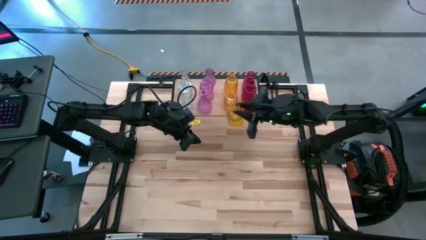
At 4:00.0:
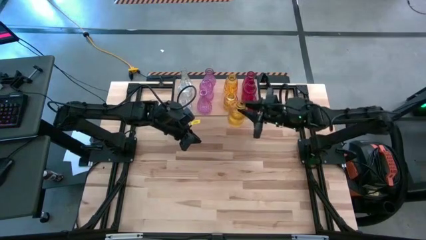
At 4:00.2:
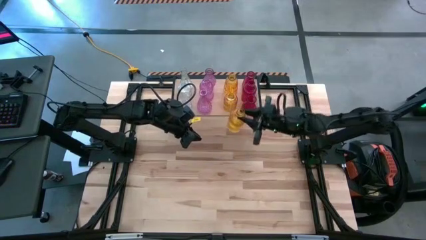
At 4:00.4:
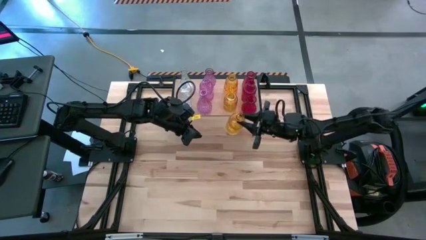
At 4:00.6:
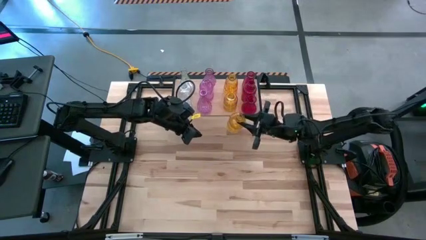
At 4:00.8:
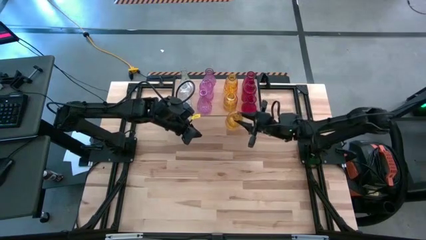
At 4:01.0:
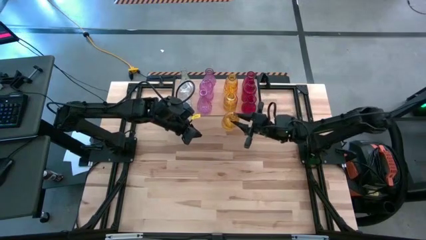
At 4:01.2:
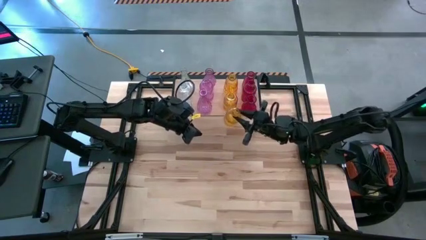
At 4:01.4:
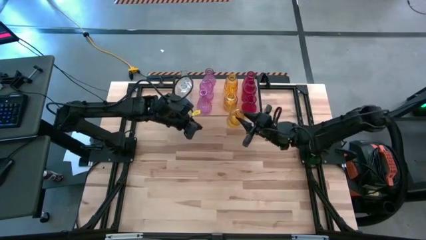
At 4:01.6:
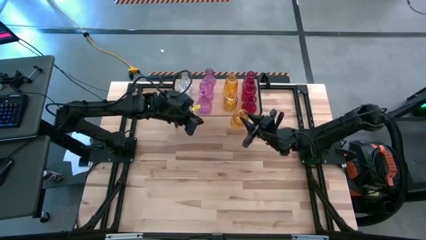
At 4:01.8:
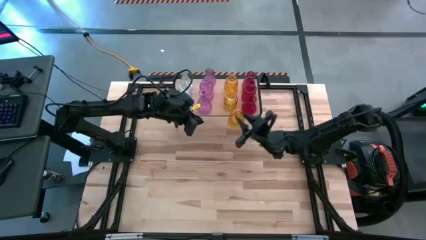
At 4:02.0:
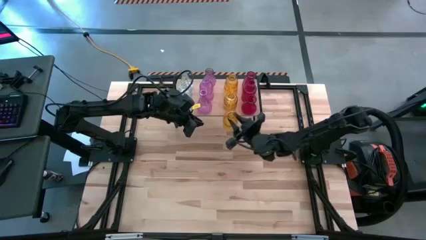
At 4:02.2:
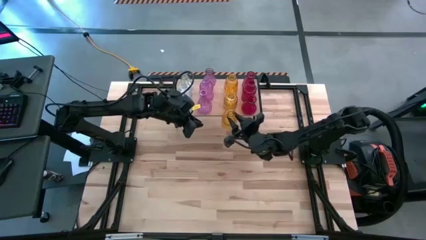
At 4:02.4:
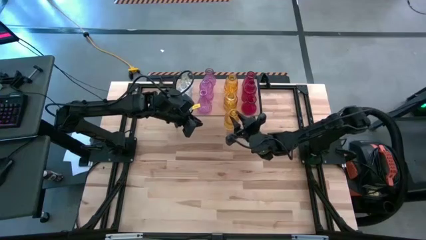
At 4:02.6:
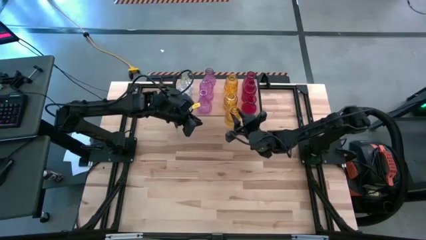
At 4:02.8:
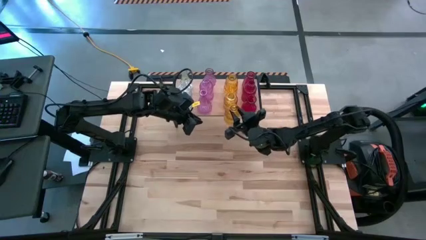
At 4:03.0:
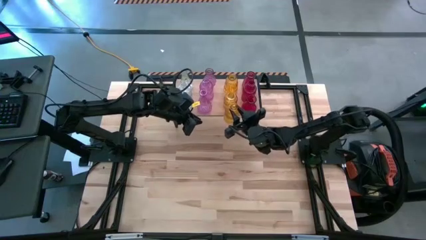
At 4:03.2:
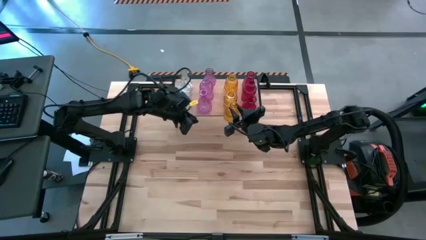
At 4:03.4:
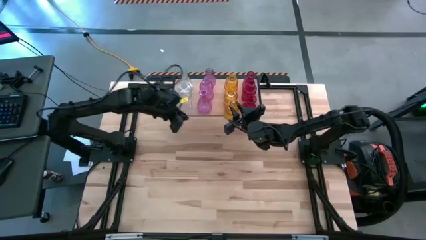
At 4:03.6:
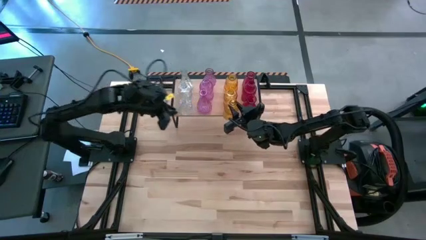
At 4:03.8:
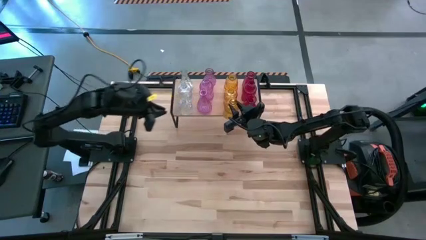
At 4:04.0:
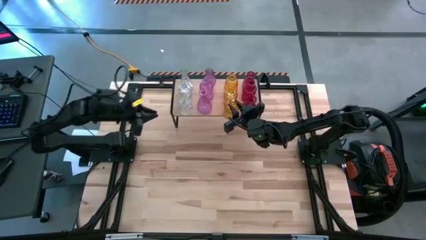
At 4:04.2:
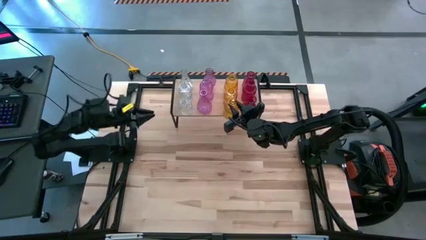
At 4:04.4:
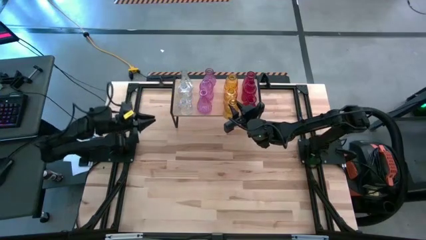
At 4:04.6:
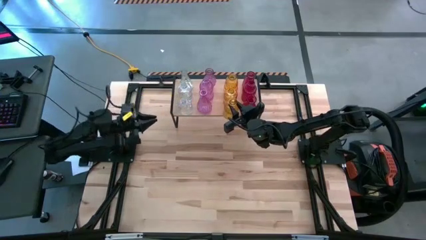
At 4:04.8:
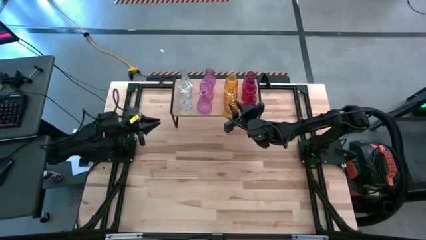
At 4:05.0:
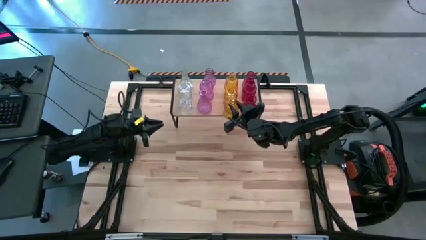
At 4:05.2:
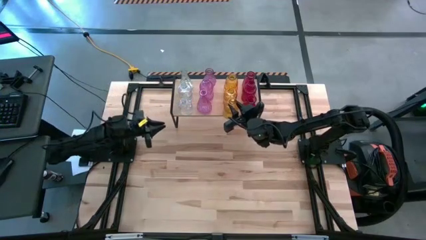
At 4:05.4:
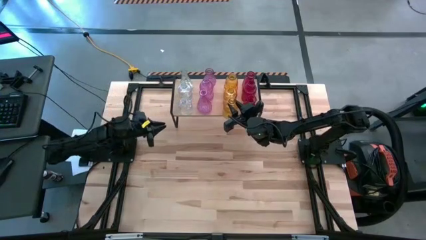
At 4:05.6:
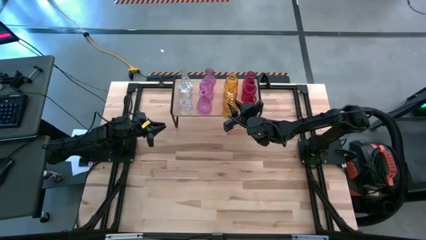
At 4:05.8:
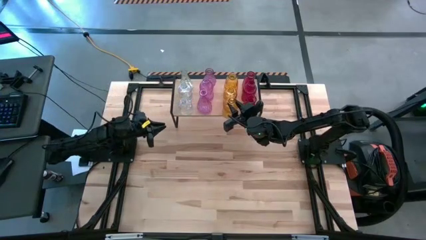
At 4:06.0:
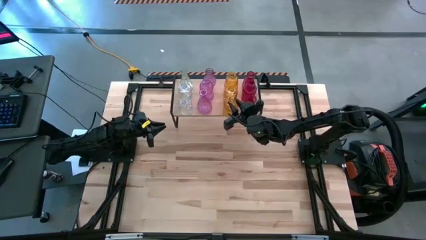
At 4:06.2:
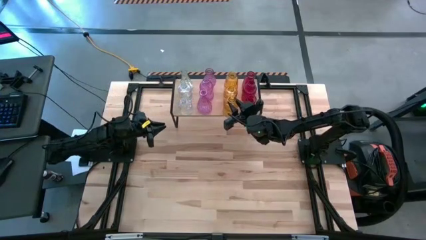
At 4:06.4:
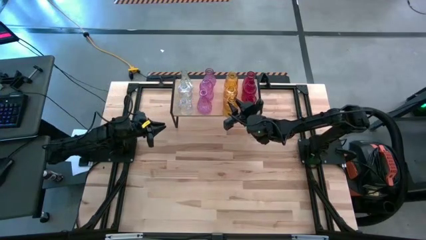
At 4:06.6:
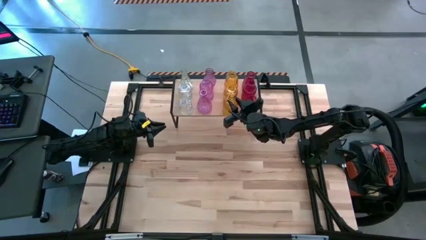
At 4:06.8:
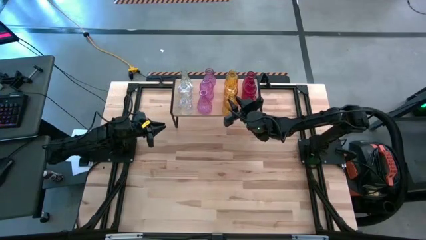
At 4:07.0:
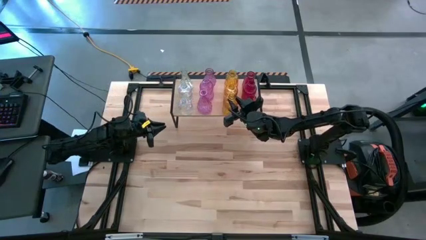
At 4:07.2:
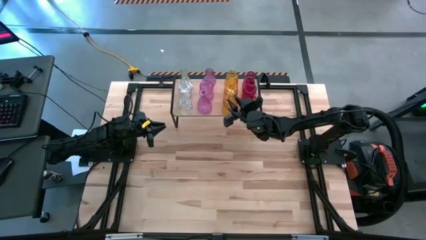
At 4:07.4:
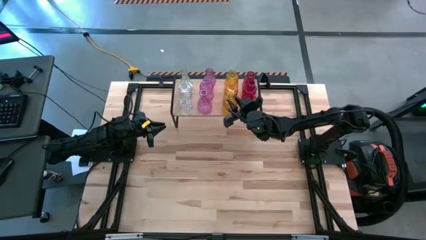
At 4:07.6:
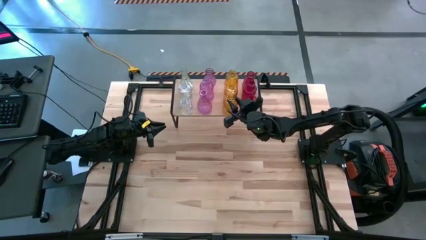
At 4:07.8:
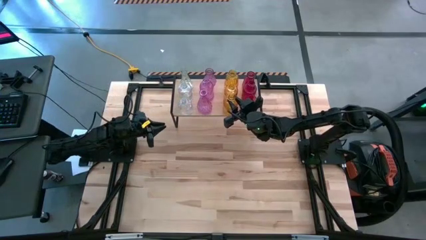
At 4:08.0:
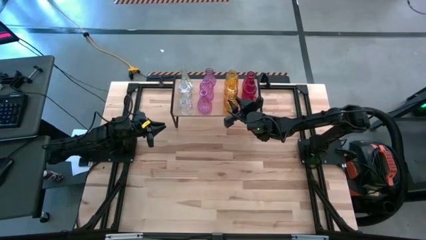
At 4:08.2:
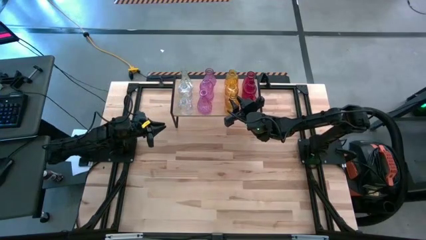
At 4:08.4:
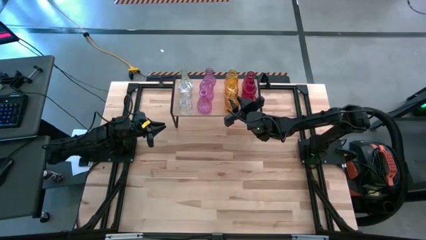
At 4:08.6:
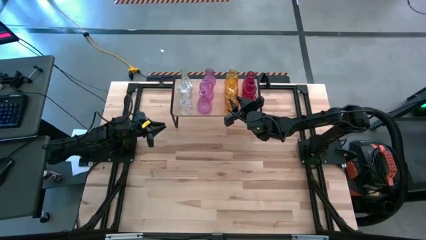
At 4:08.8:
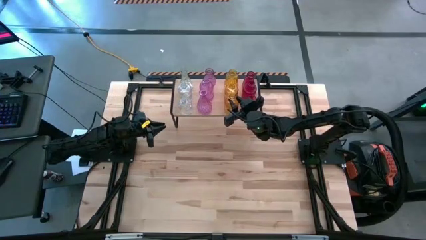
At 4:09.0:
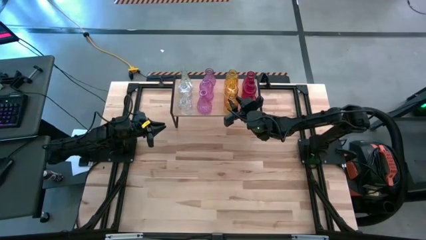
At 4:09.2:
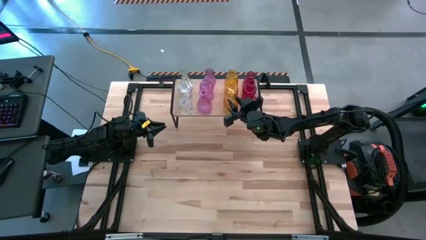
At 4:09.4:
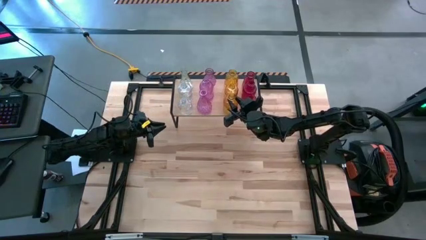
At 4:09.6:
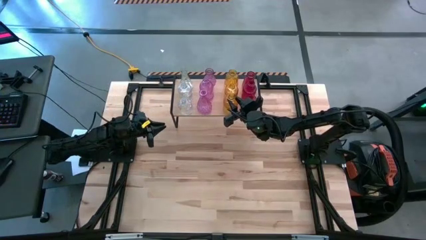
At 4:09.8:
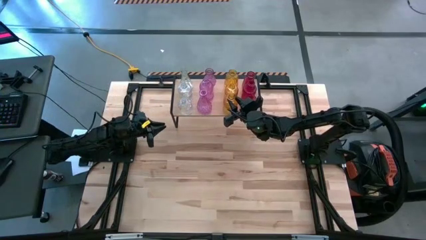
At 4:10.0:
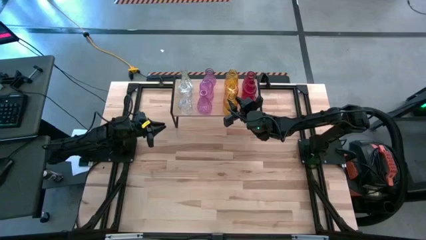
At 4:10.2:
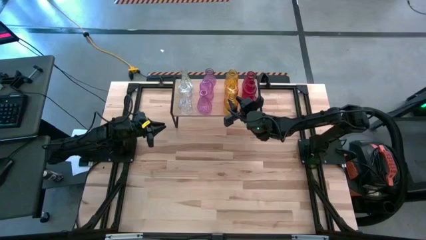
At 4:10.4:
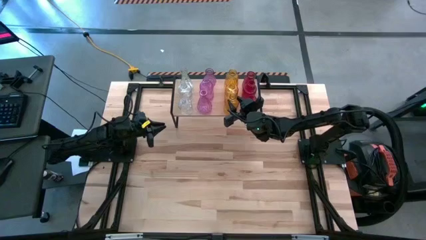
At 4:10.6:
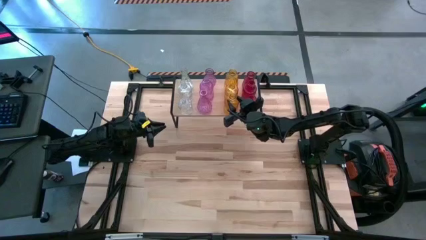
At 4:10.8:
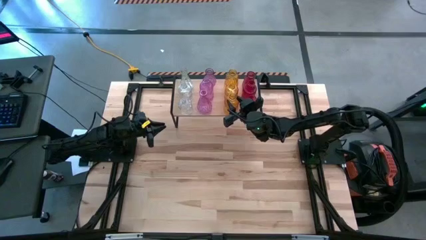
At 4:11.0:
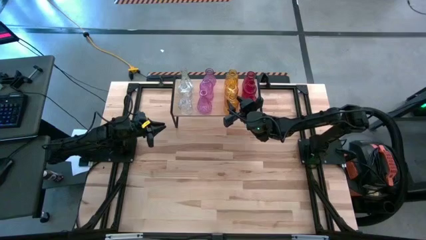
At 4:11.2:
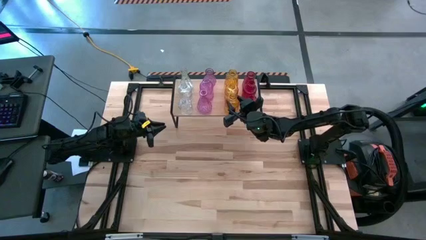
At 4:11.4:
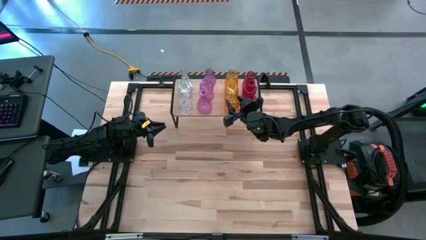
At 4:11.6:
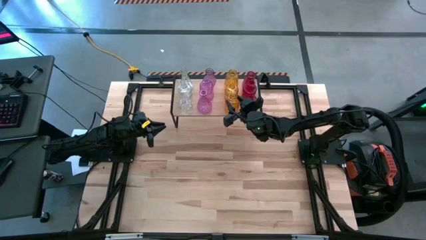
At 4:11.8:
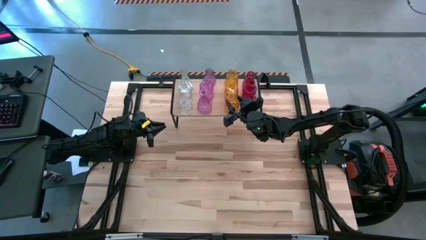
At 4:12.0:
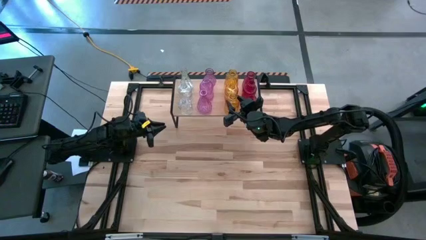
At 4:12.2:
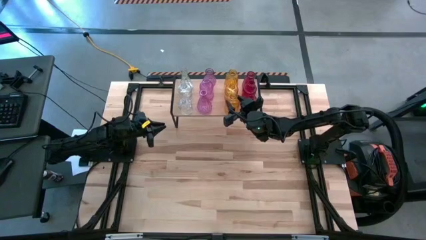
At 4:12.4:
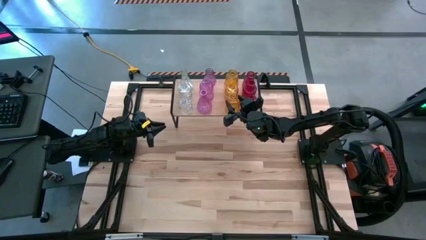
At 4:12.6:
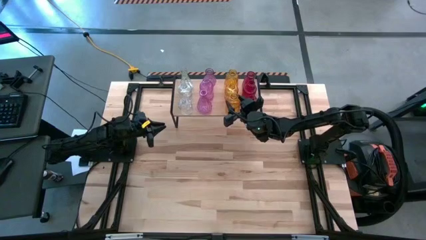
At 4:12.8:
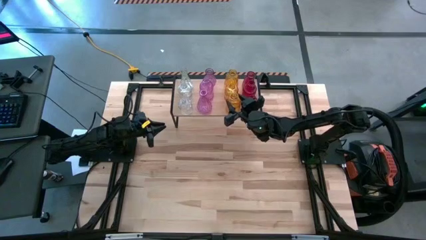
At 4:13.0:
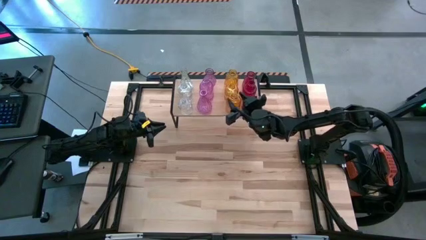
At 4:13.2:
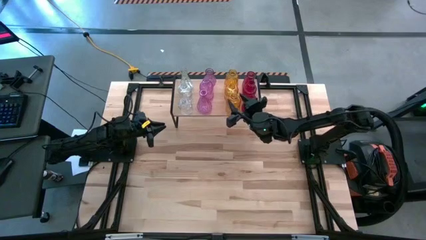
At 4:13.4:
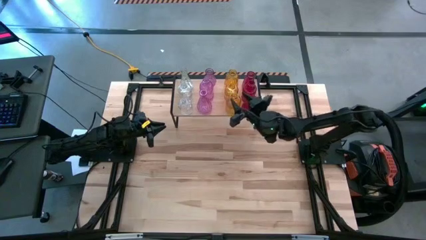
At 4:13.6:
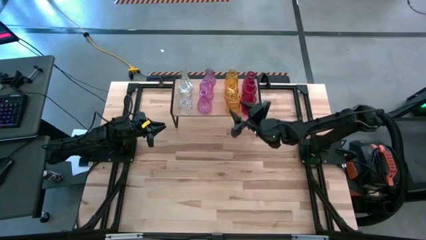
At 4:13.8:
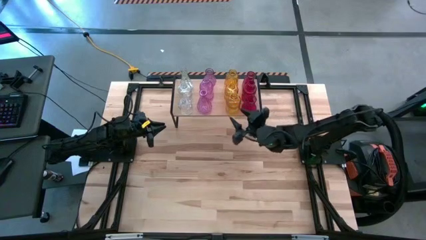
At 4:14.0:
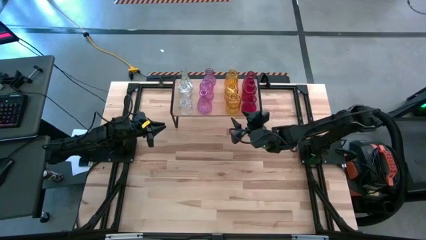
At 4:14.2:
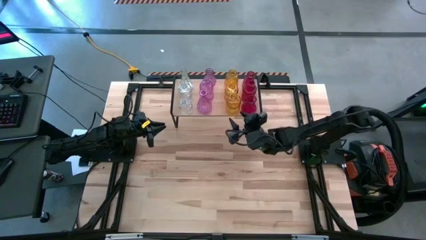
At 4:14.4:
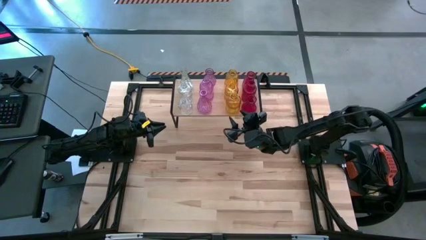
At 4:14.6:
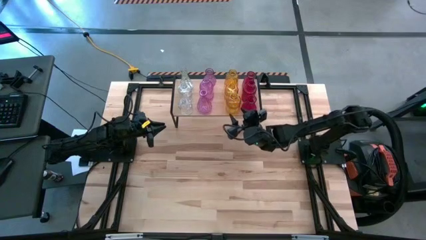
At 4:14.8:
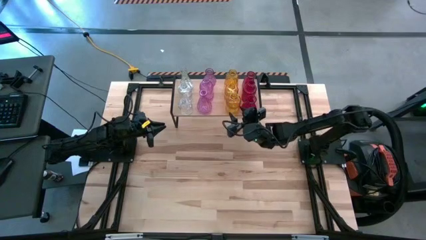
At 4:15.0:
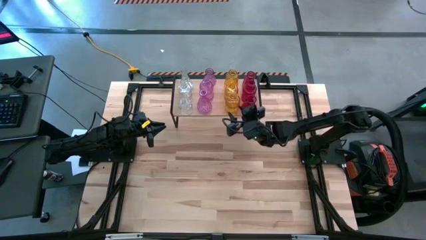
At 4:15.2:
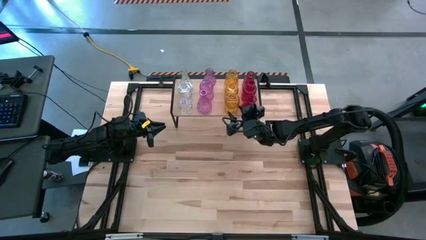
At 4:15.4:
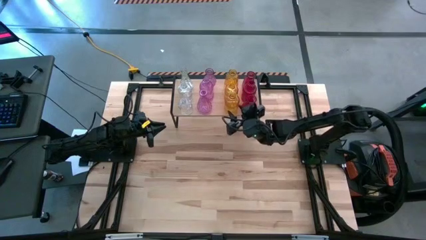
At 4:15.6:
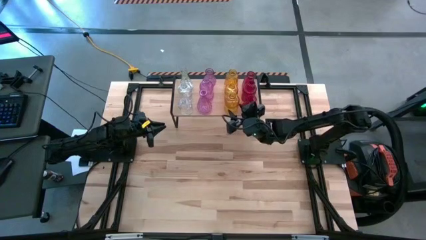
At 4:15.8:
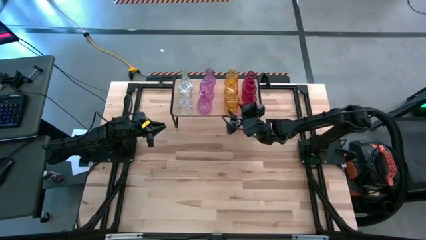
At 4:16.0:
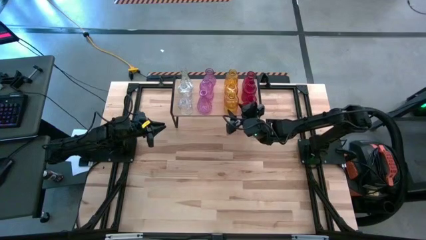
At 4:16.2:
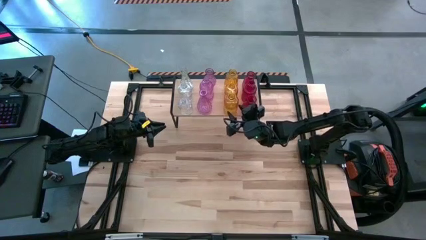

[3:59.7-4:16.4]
Task: sort vases onto shelf
Put the yellow vase on the shelf aligned with the other yellow vase
